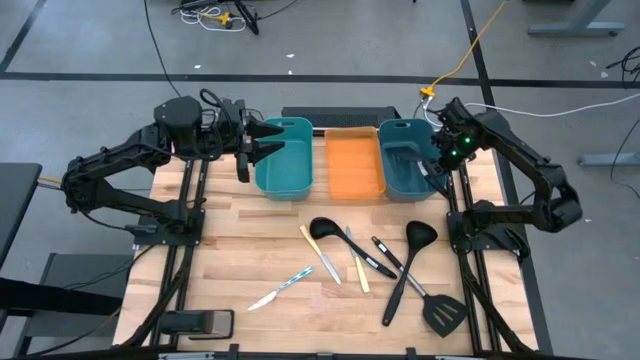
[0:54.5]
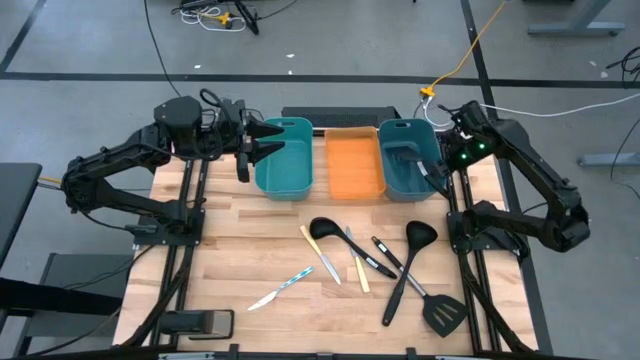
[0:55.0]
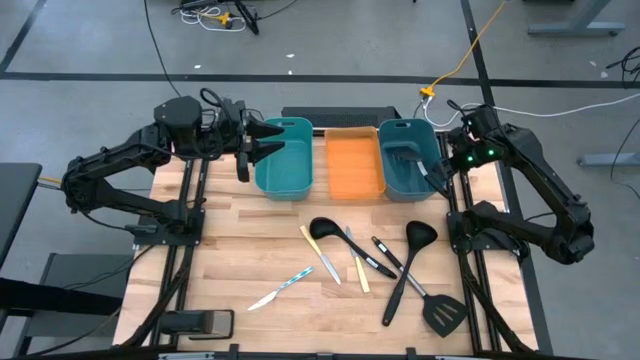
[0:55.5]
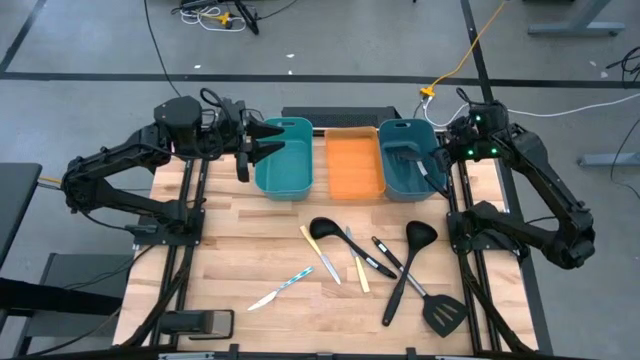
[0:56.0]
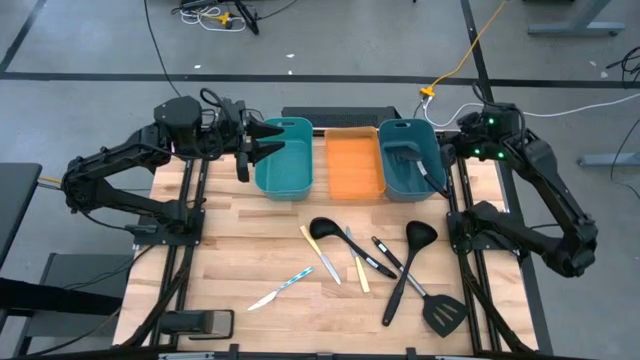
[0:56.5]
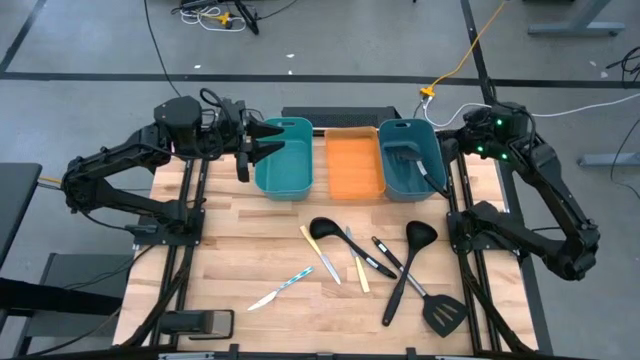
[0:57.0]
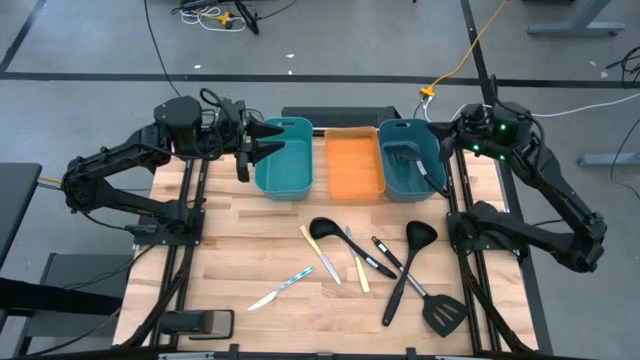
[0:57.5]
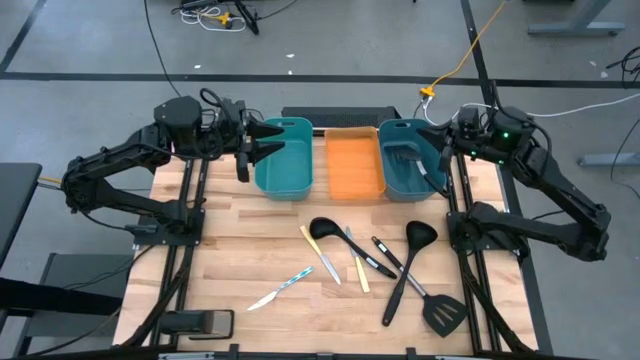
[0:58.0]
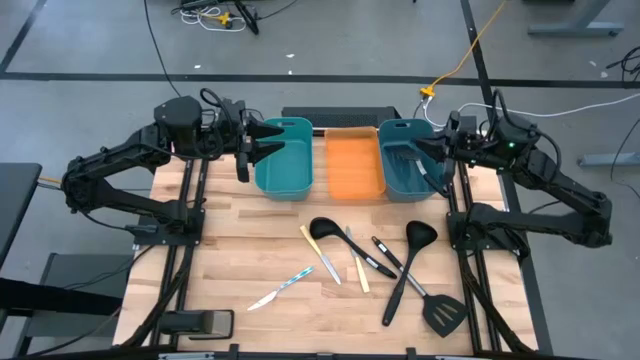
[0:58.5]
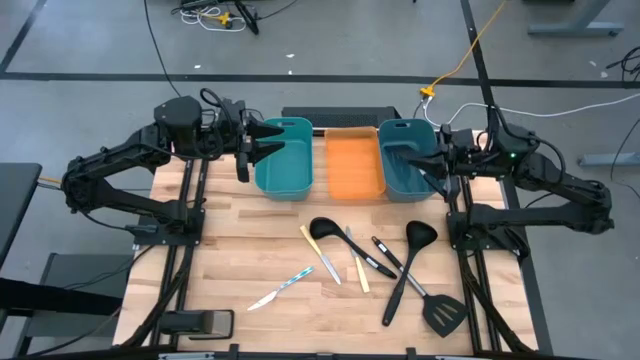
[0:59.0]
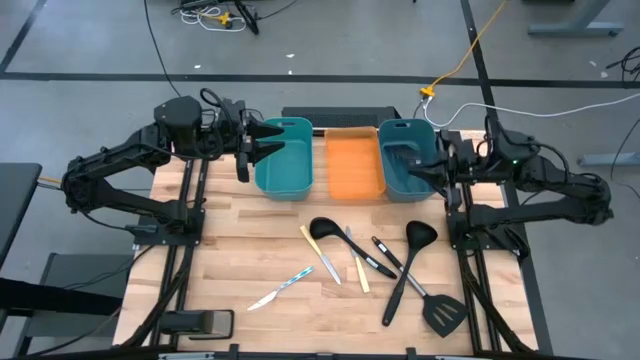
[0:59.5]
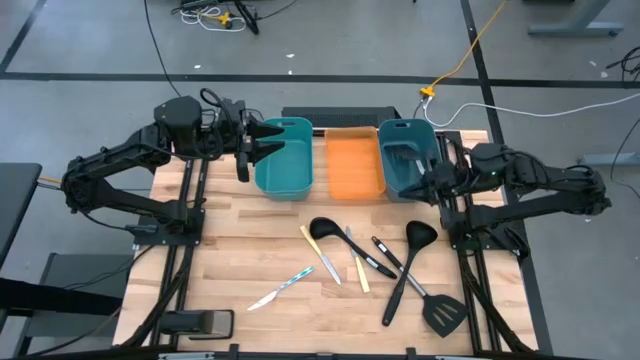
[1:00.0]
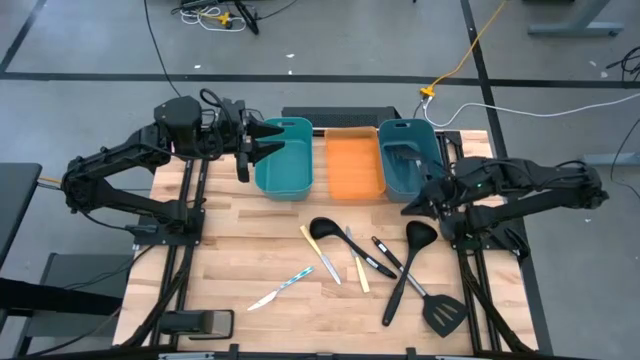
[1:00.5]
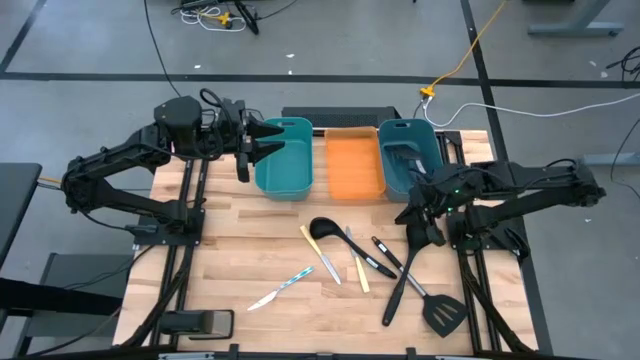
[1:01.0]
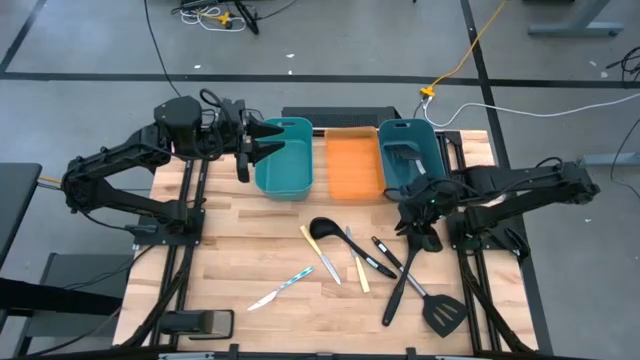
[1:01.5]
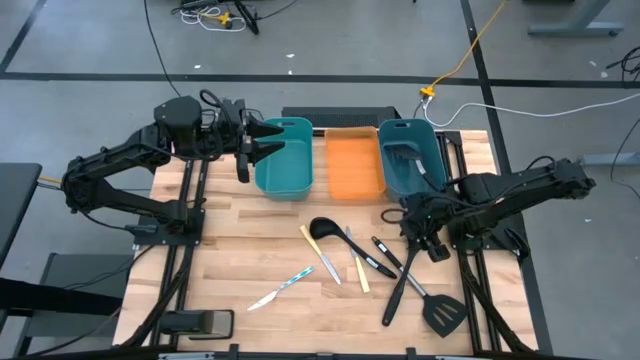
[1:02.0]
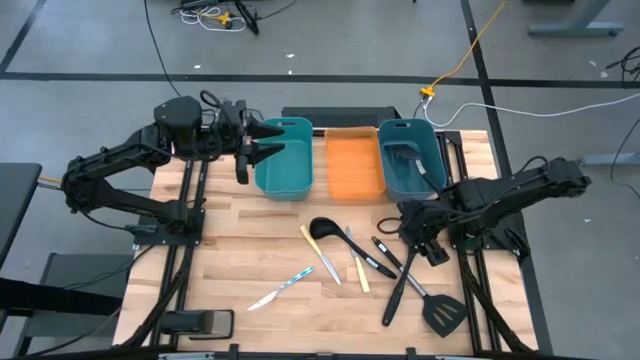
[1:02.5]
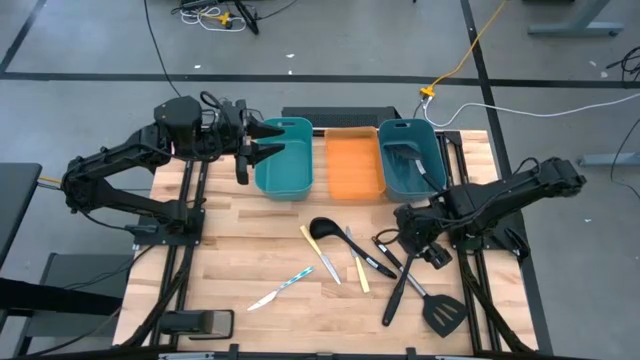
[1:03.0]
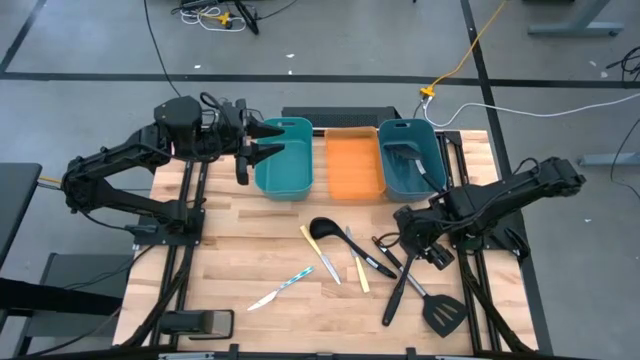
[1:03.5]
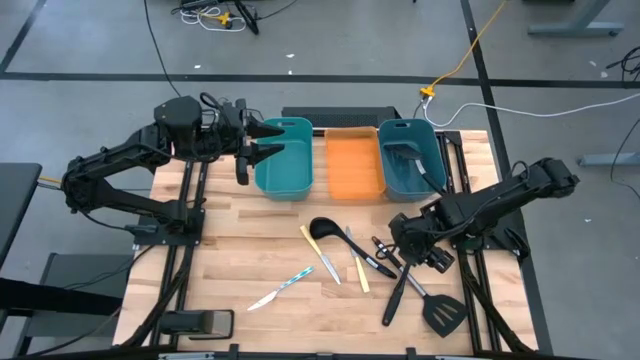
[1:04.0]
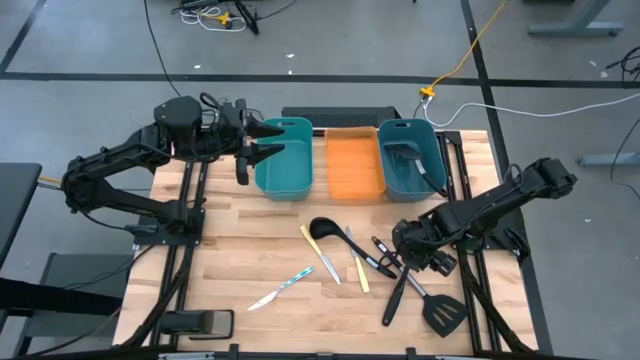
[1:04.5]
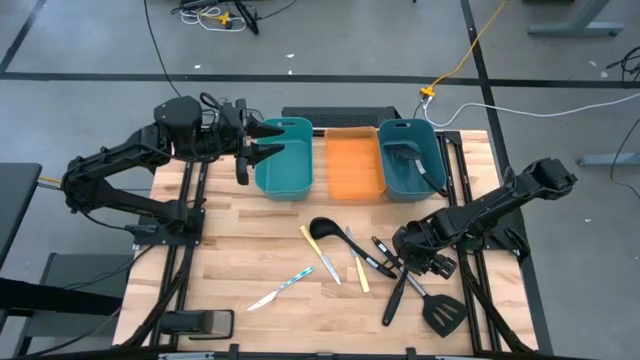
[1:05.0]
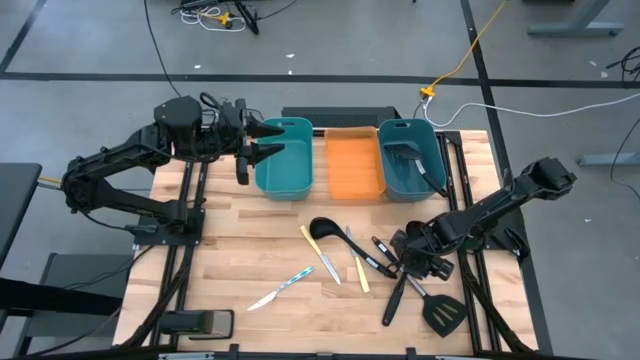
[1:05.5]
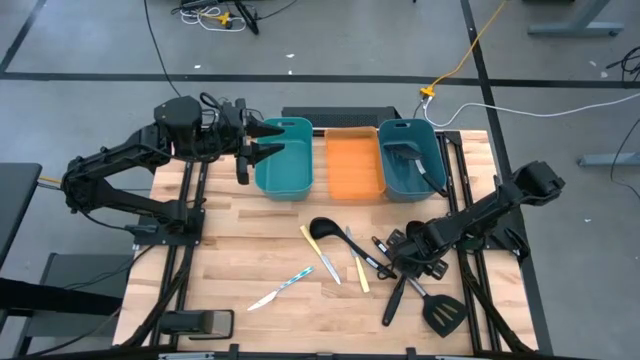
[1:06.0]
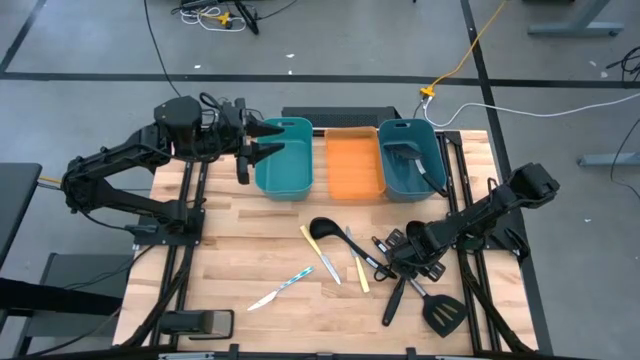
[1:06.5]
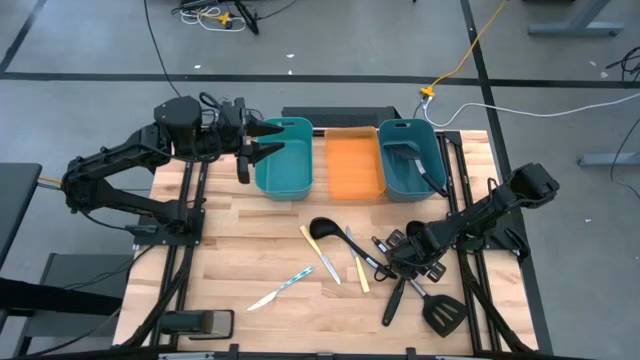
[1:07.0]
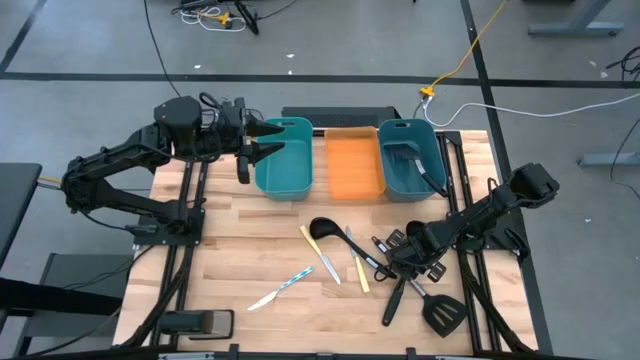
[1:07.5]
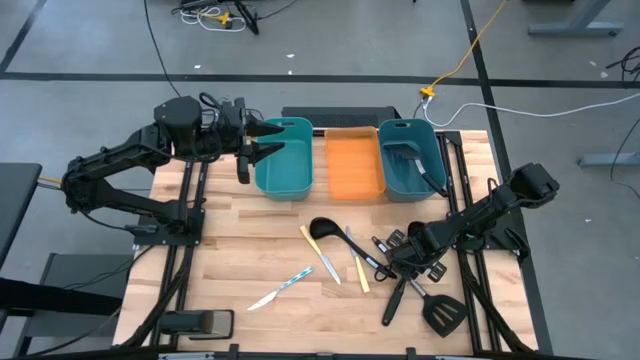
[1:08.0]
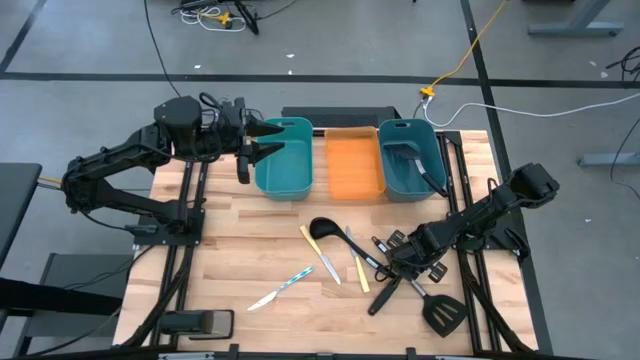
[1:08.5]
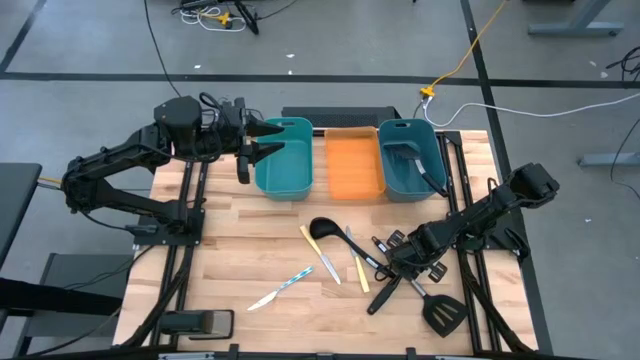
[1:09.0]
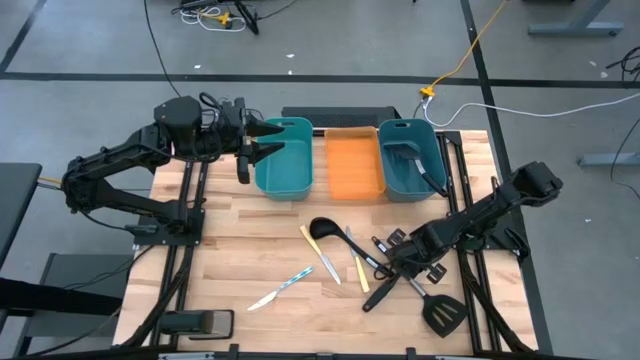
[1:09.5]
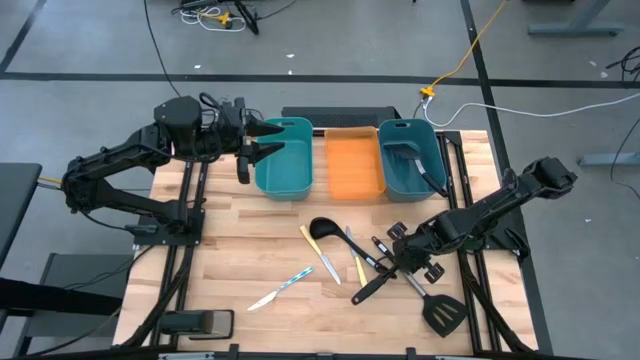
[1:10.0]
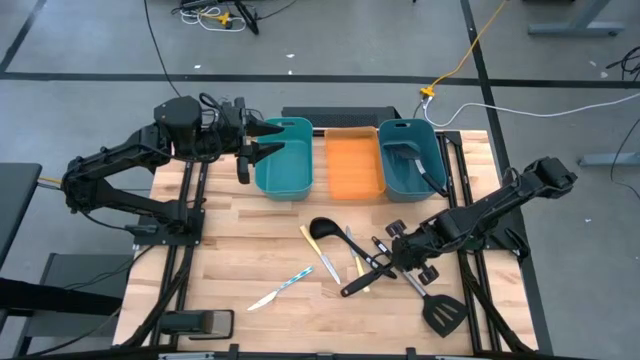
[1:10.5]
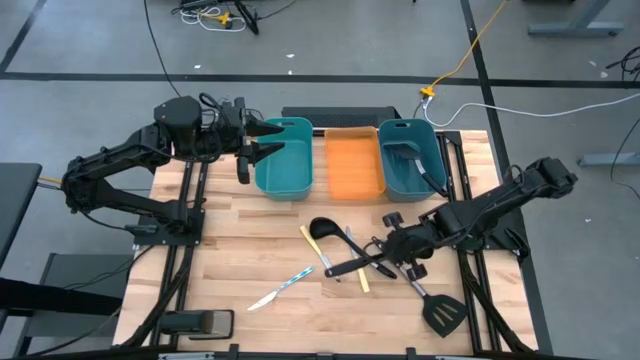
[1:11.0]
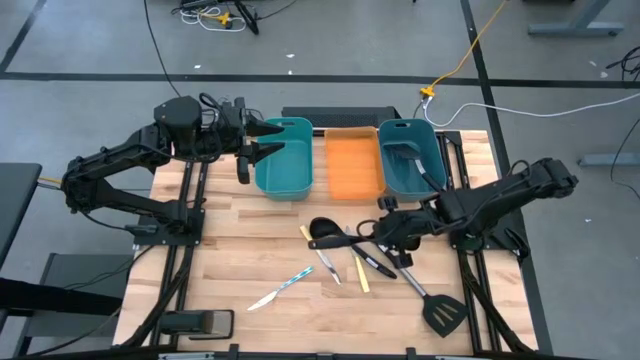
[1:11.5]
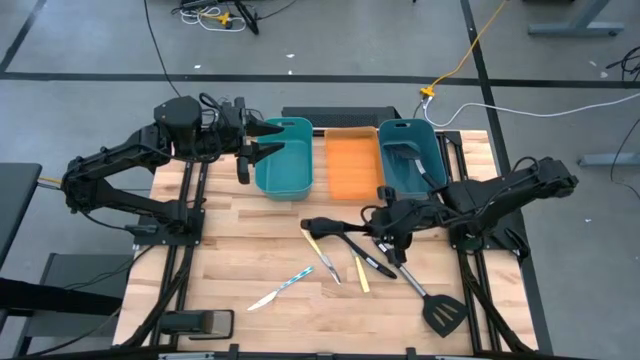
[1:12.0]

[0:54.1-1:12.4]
Task: Pick & Place Kitchen Items
Put the right black serving spoon into the light green bin
